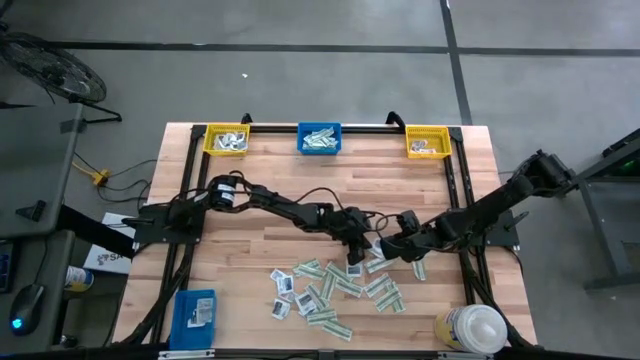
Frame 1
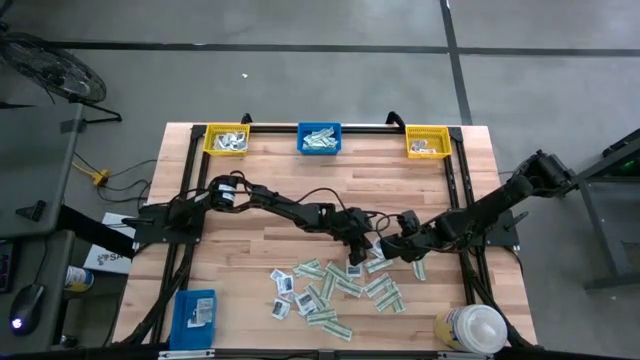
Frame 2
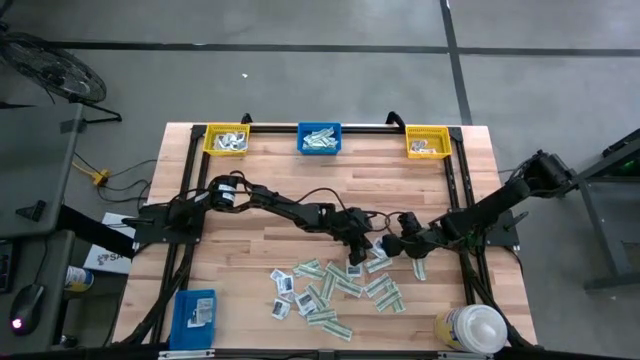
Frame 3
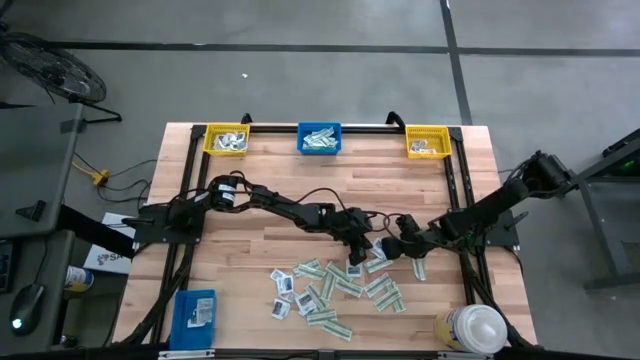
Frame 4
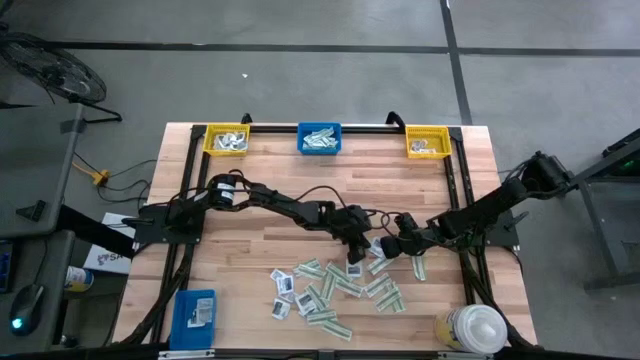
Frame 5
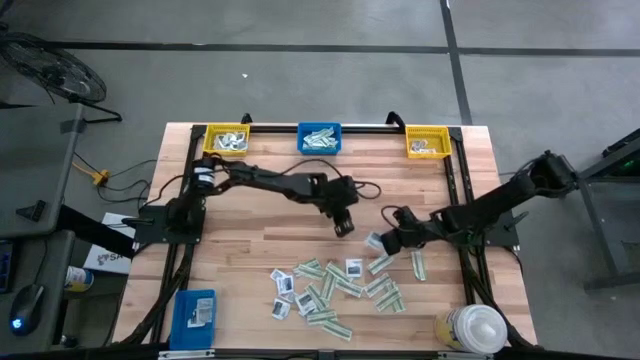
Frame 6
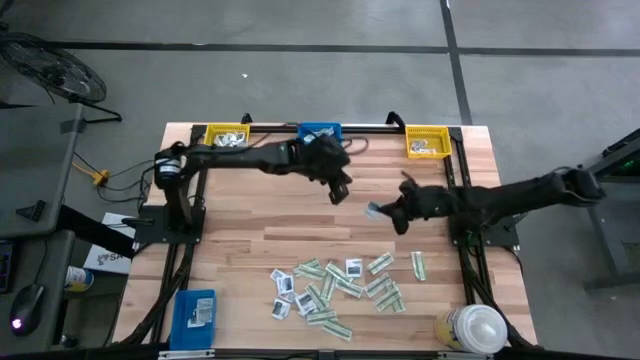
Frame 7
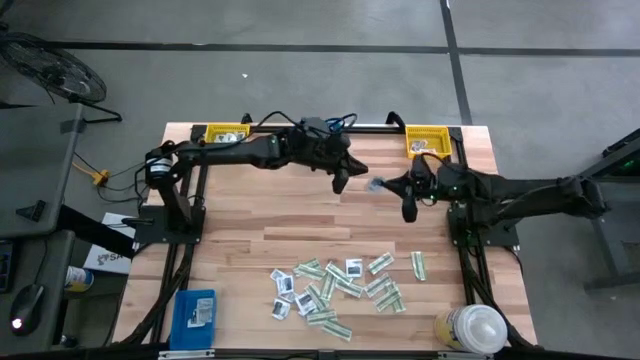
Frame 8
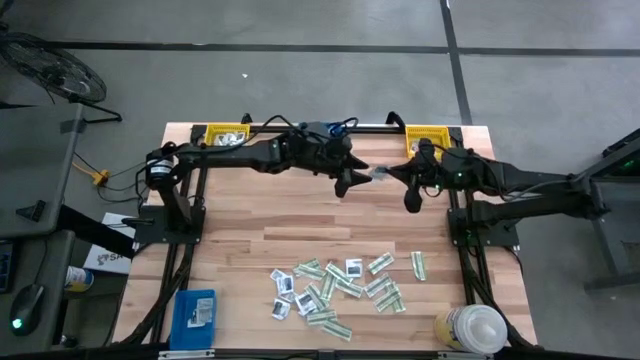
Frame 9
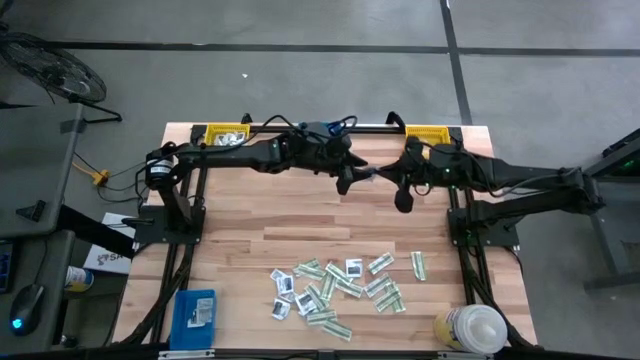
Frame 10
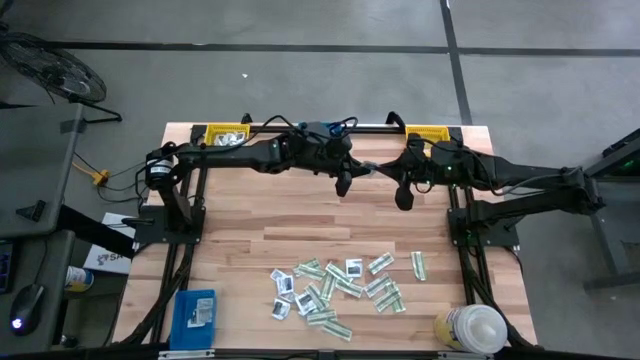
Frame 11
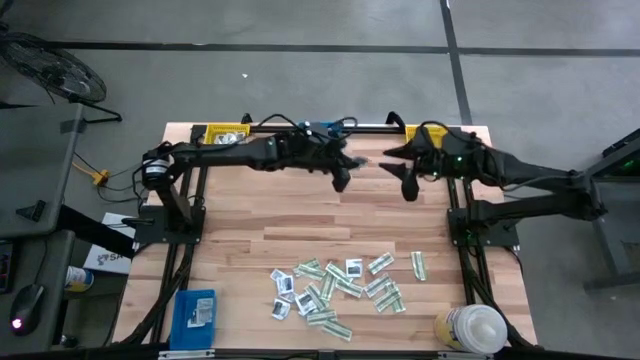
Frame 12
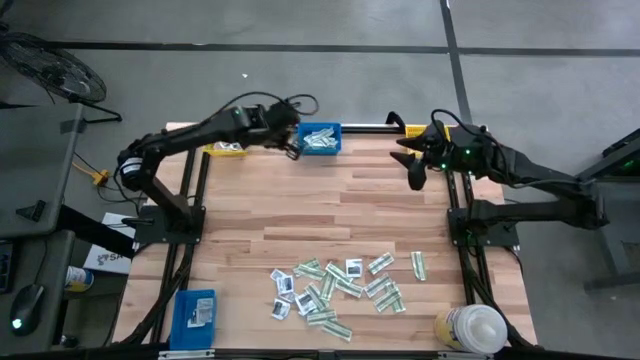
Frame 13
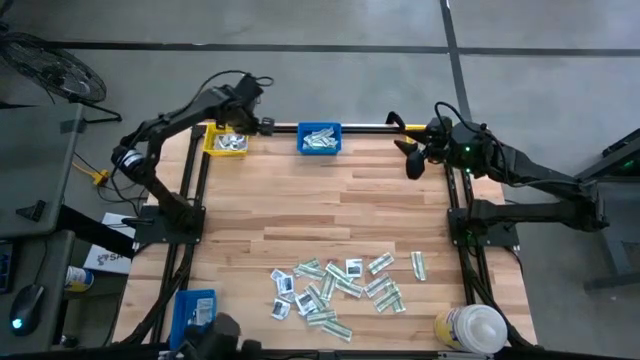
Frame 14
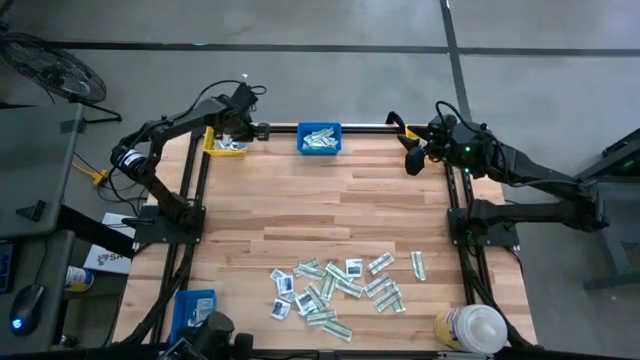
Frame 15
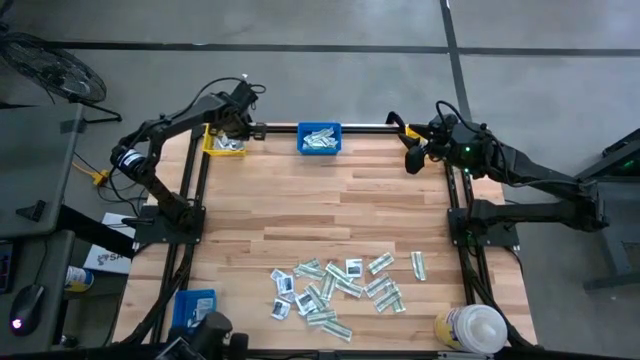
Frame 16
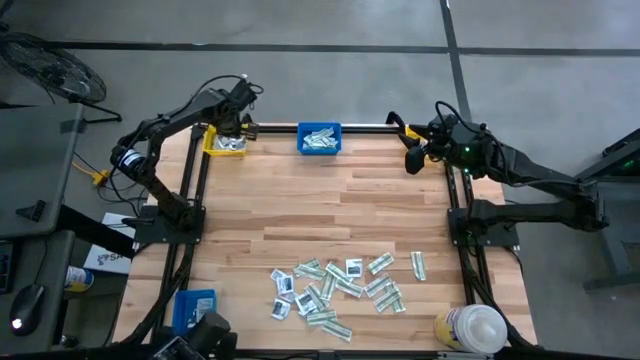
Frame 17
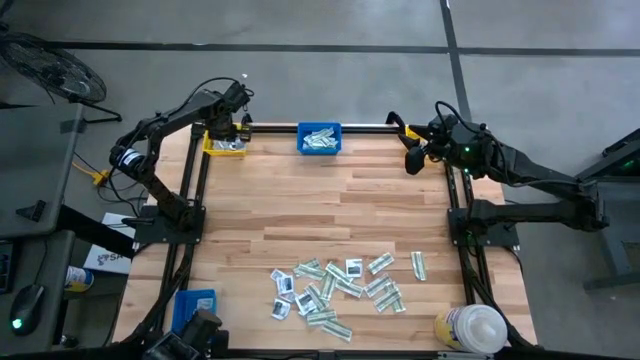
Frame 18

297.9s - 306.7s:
Task: Pick & Place First Aid Supplies
Put the gray towelette pack into the left yellow bin

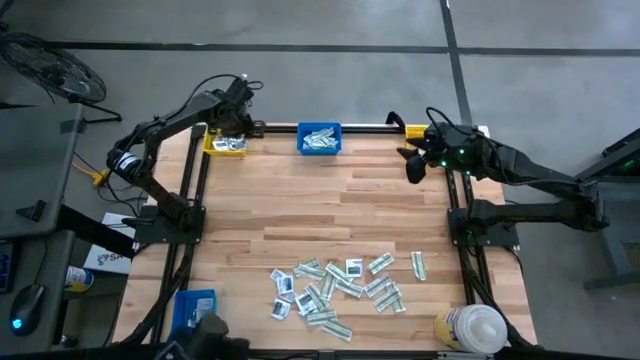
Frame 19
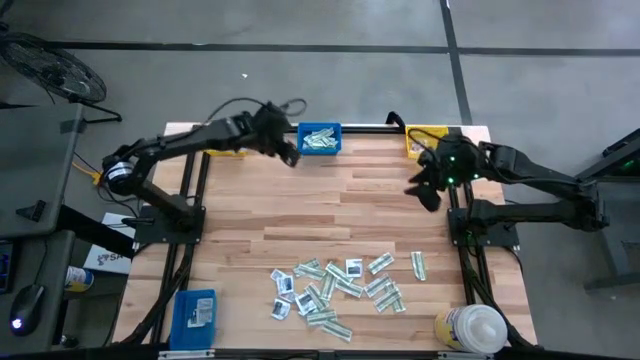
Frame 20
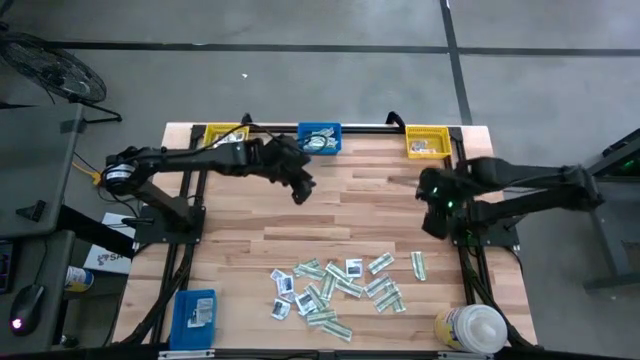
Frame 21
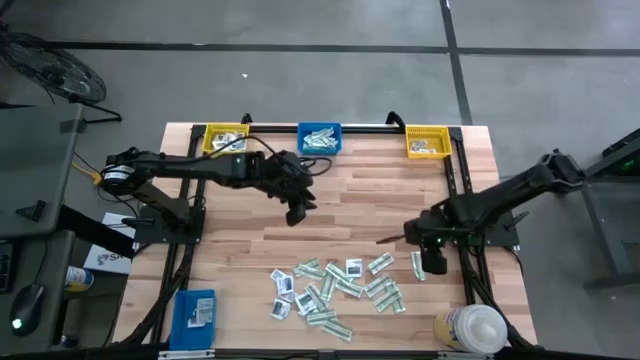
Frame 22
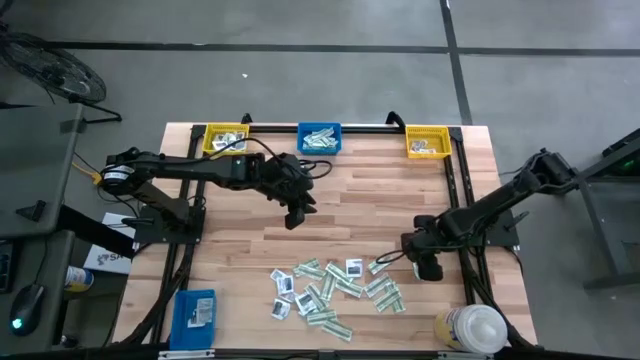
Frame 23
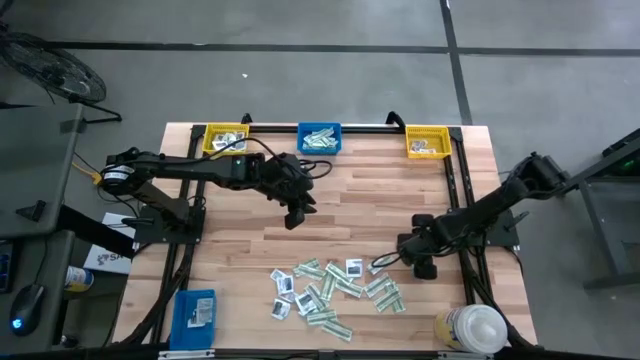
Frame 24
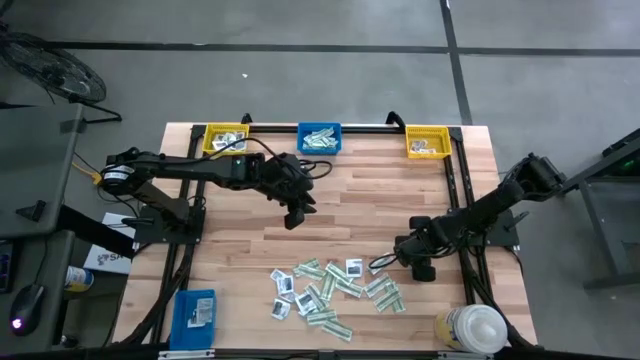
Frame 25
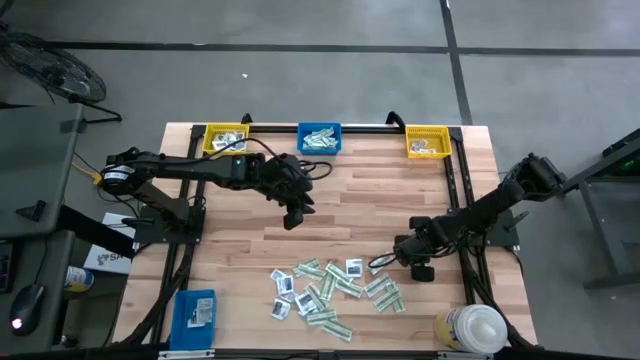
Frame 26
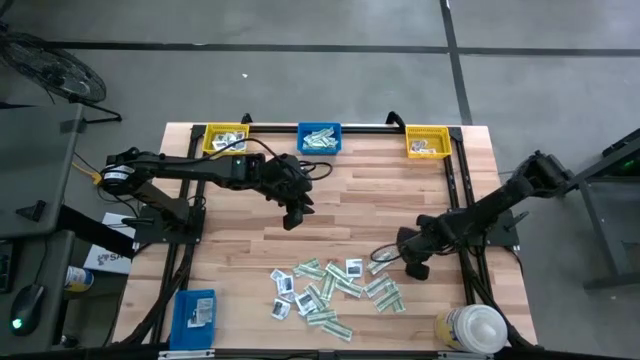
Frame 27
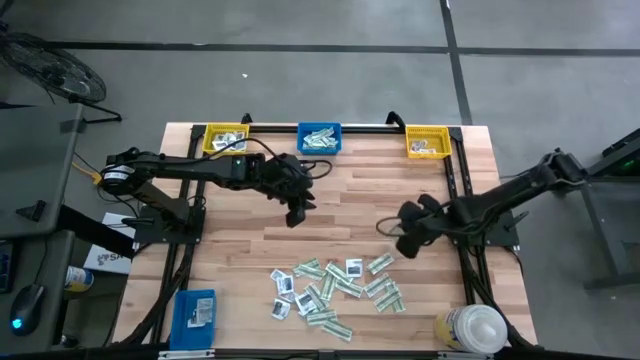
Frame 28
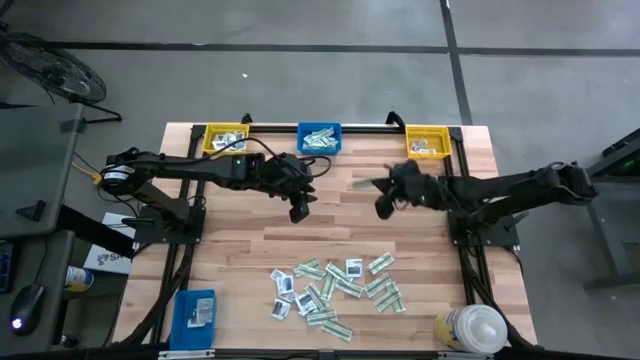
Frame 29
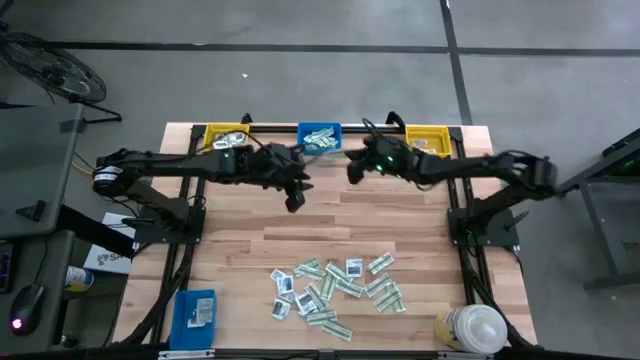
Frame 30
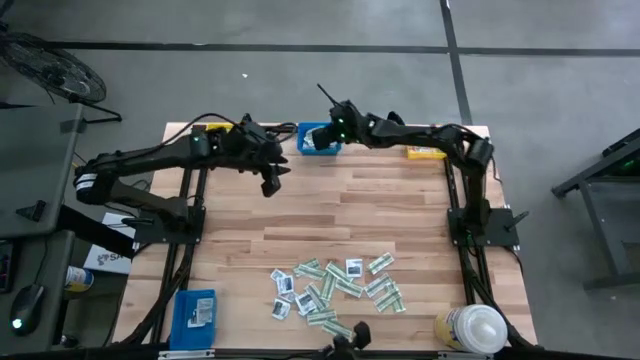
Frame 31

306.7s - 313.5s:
Put the green bandage pack into the top blue bin

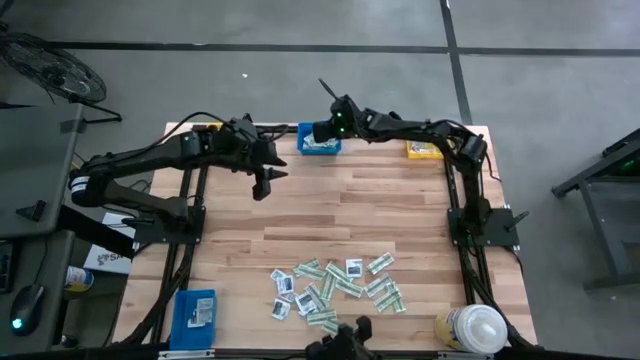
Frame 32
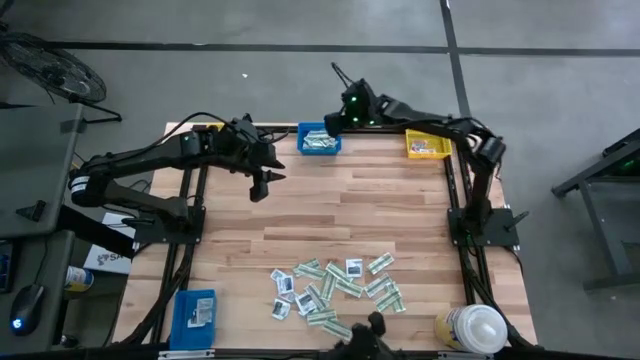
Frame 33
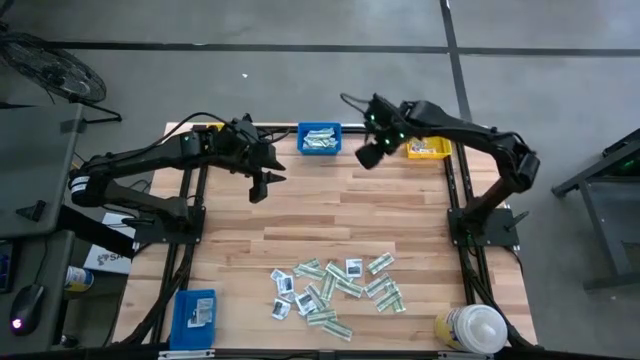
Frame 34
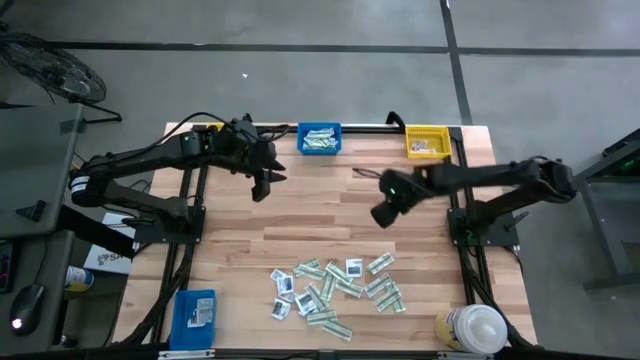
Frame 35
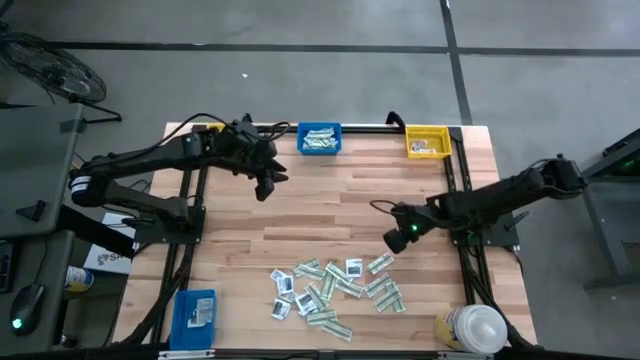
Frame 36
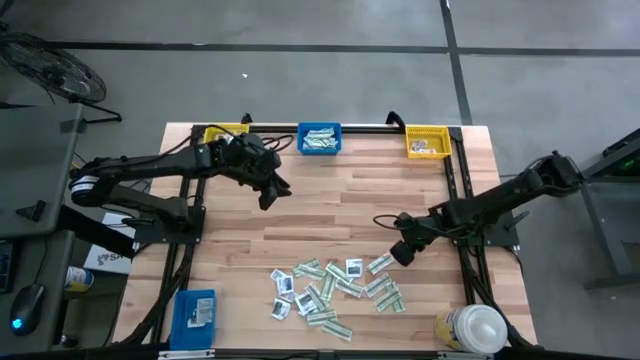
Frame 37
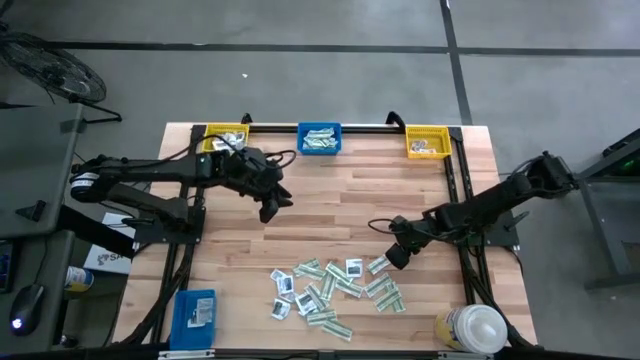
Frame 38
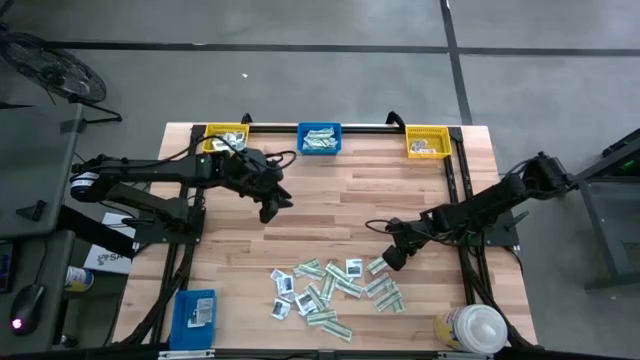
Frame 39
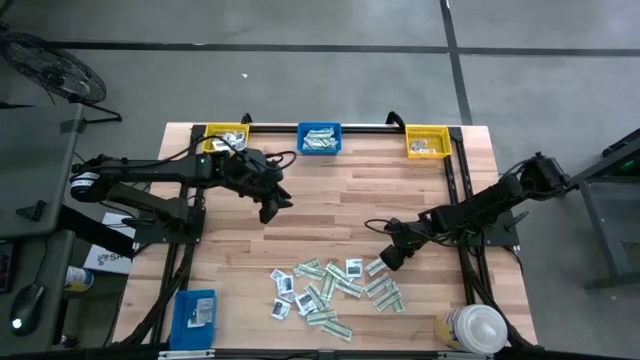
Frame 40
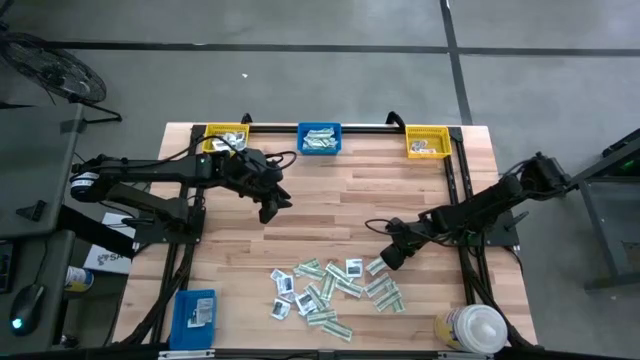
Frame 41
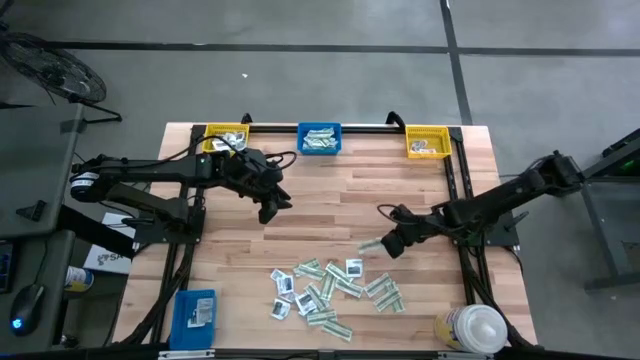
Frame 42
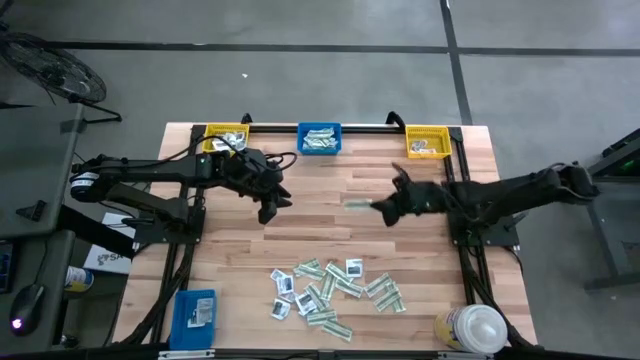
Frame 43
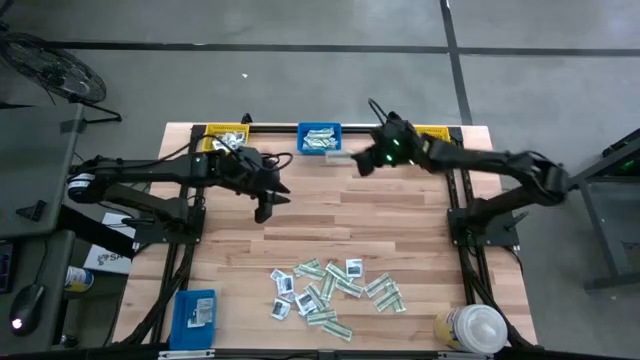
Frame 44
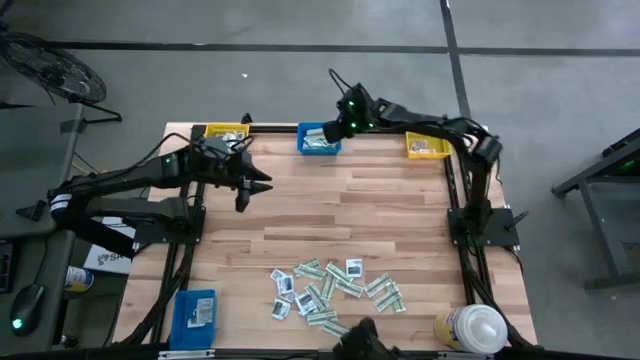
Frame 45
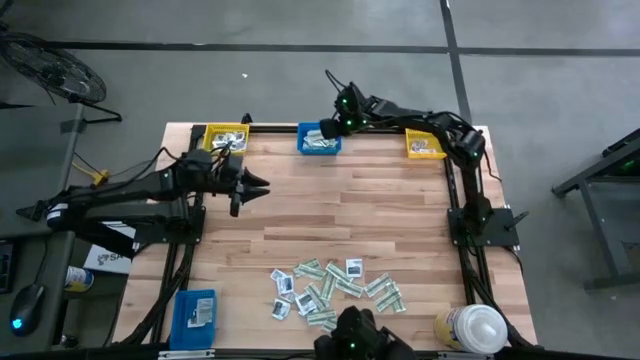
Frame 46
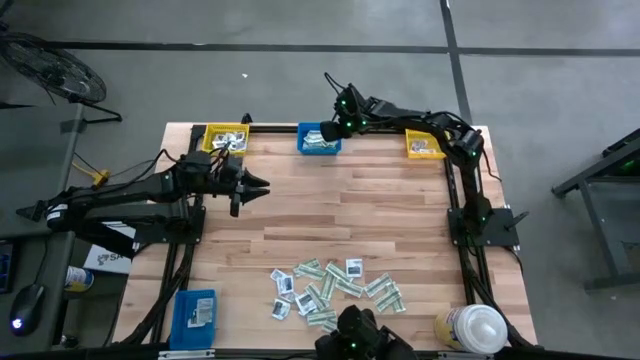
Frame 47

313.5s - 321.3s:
Put the green bandage pack into the top blue bin
